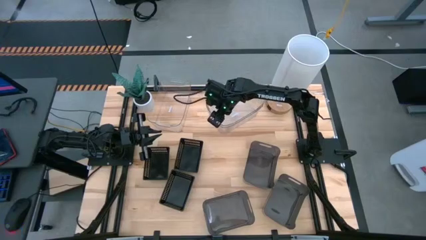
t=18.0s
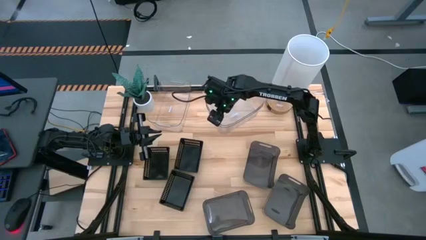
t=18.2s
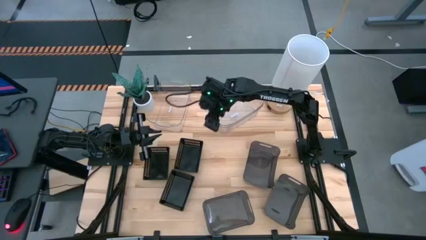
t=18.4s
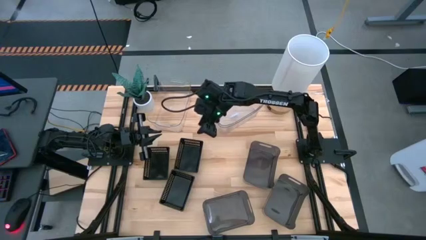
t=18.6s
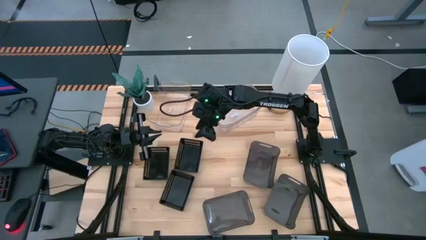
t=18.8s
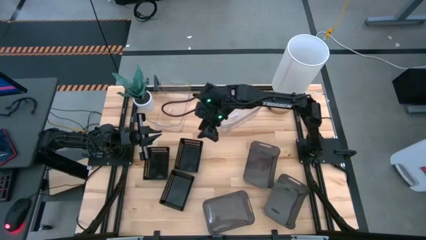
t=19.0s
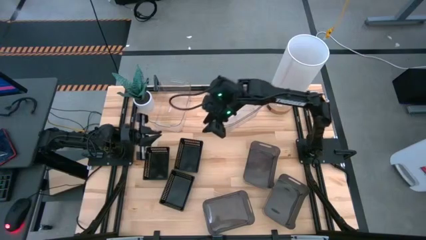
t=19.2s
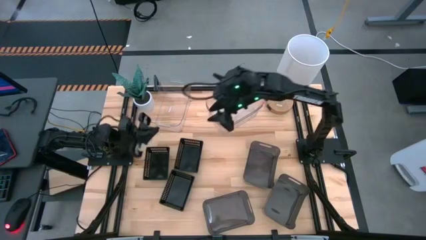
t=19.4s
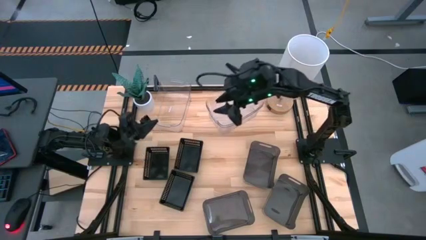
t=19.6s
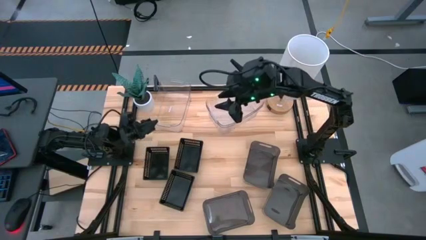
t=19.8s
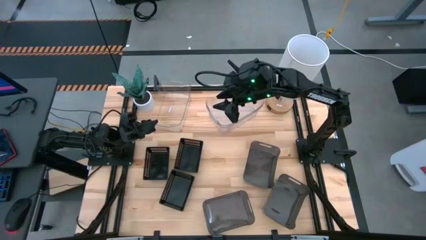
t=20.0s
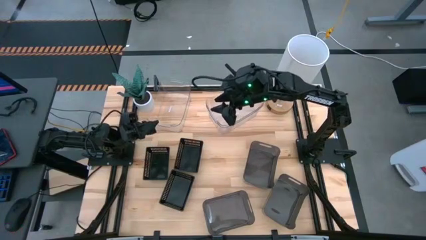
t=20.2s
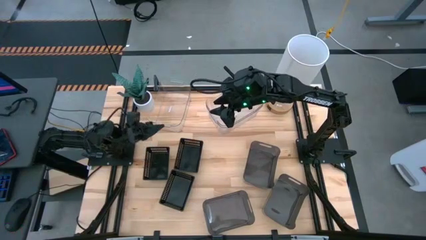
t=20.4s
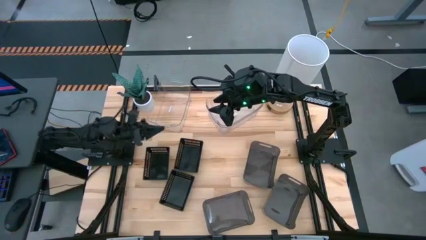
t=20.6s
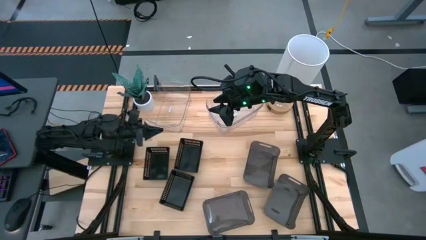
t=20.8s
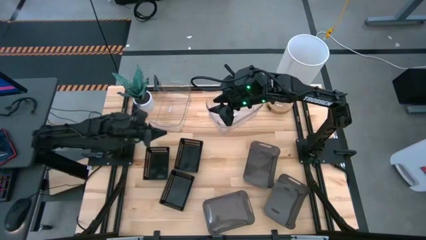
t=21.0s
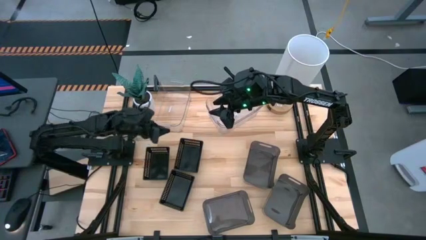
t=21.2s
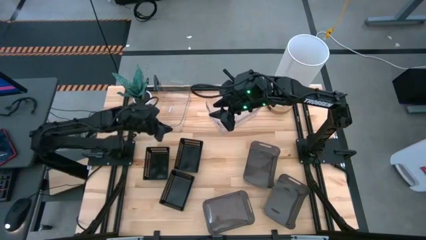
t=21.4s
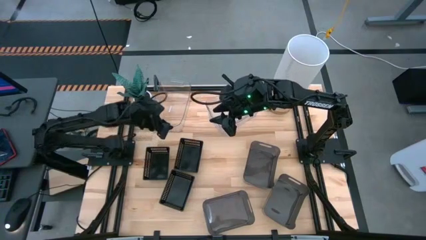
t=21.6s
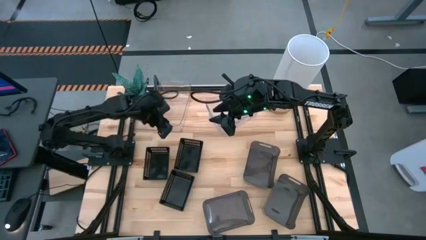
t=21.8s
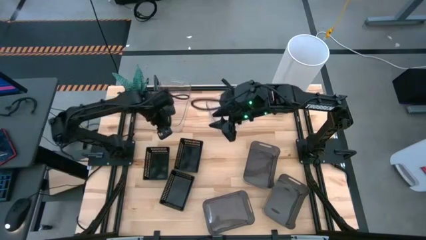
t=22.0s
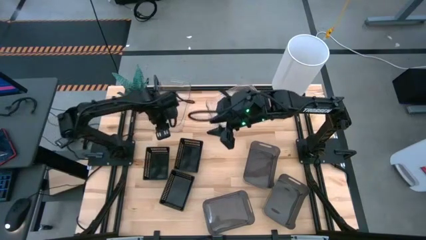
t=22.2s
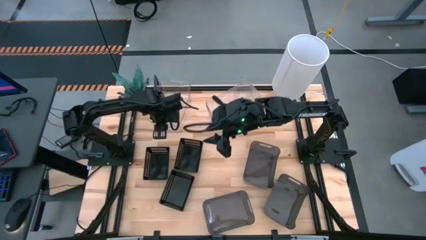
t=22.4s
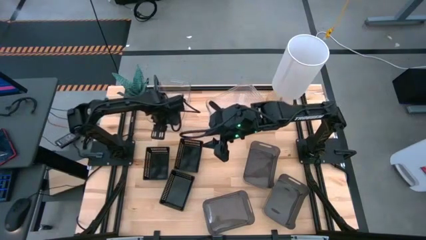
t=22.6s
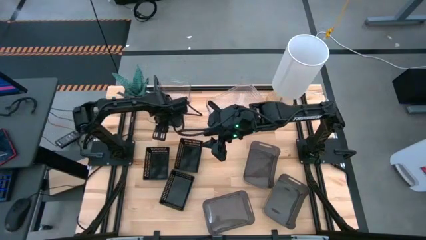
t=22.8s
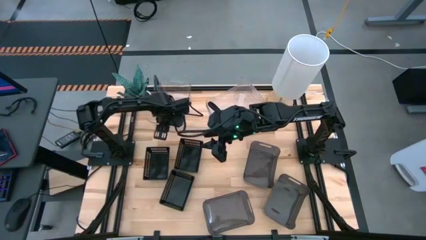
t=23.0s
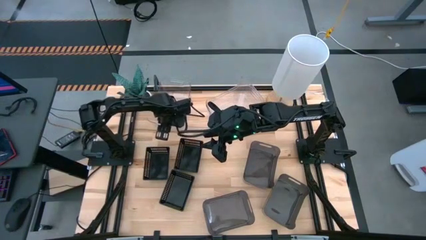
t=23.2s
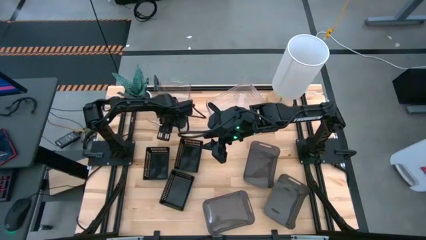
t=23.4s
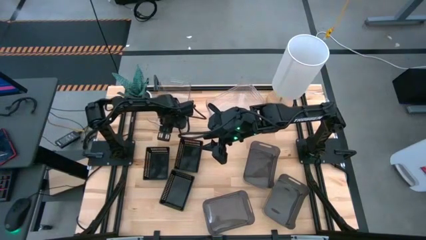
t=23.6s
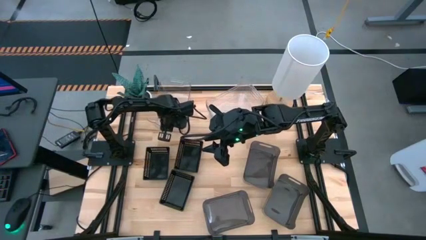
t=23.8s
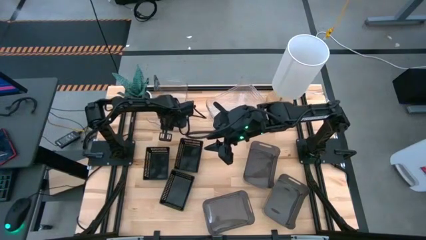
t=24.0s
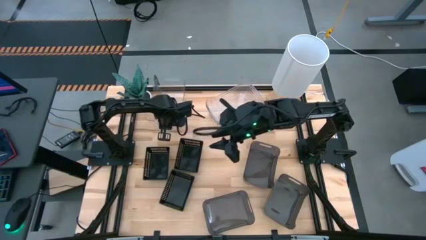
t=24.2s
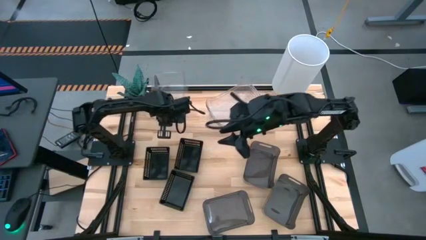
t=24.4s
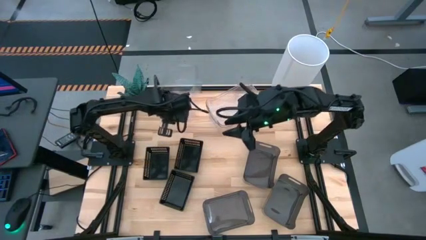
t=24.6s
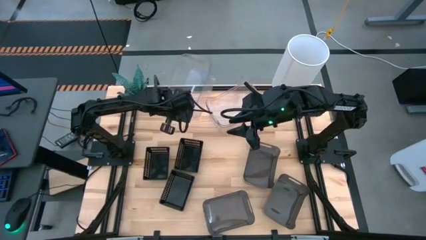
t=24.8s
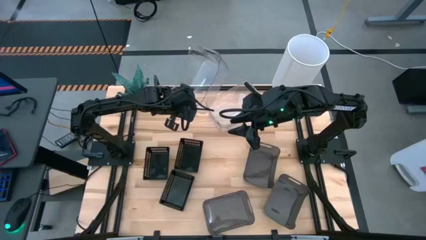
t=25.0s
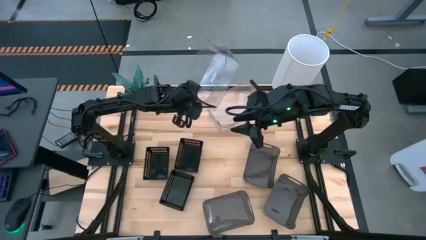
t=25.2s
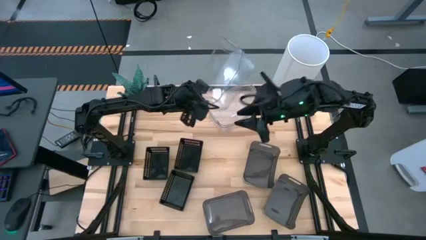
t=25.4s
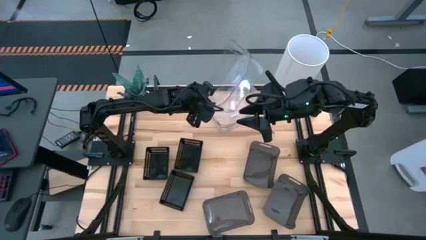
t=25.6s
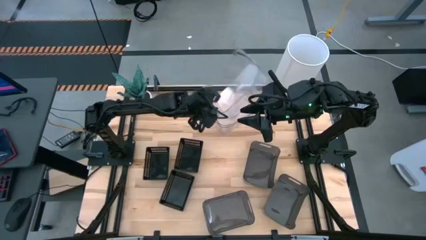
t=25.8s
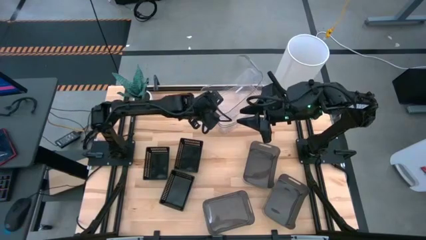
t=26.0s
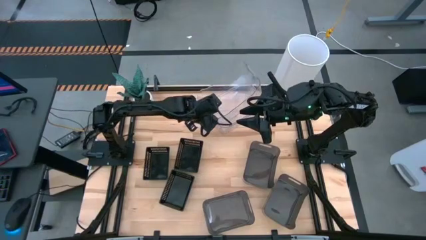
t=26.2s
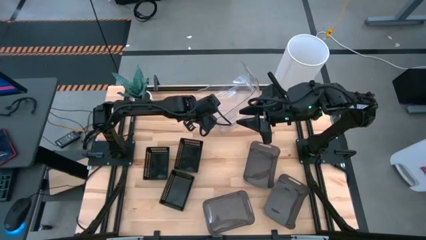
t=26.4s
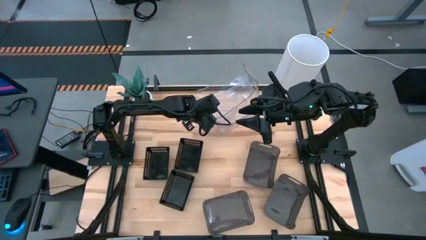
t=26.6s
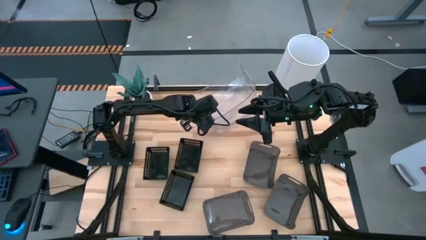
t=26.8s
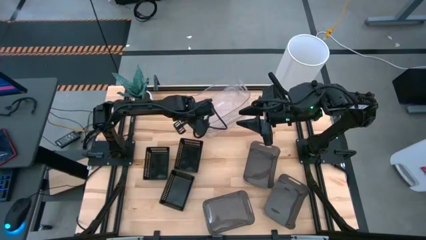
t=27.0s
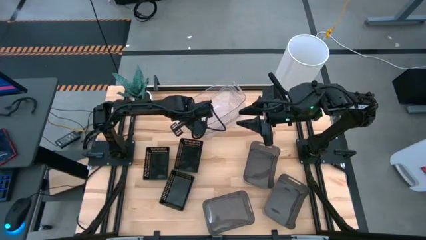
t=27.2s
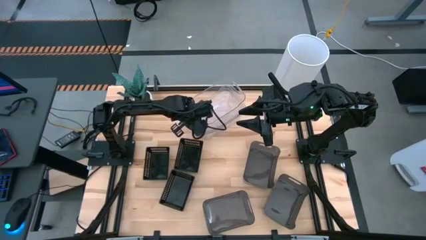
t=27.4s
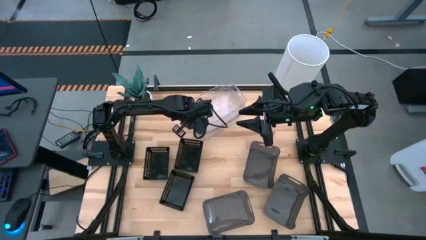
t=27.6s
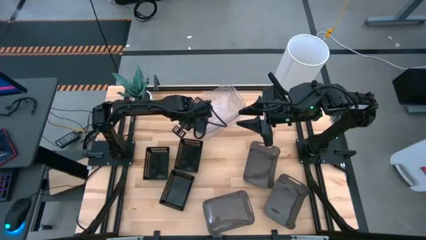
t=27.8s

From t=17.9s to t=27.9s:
Stack the left transparent bin on the top of the transparent bin

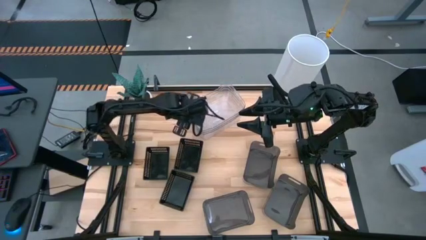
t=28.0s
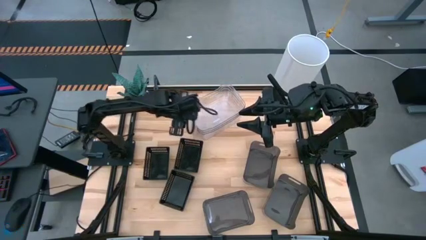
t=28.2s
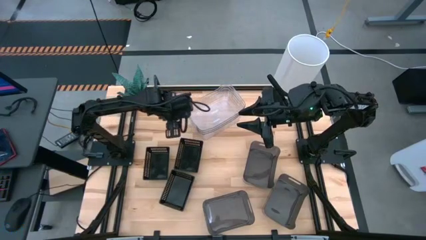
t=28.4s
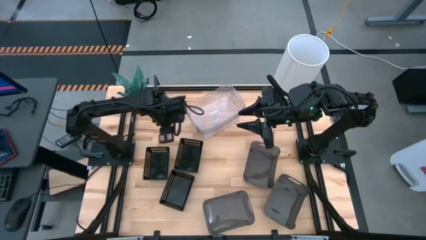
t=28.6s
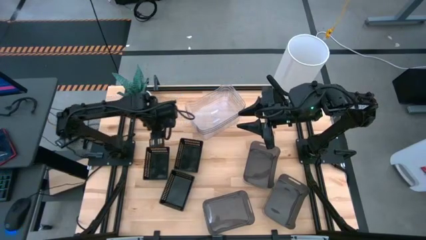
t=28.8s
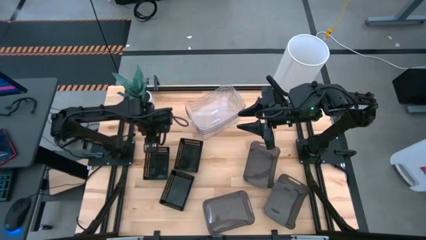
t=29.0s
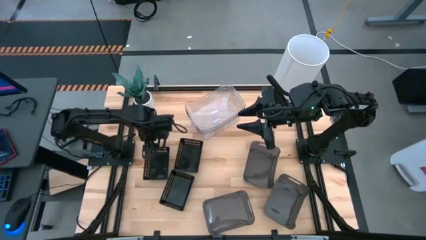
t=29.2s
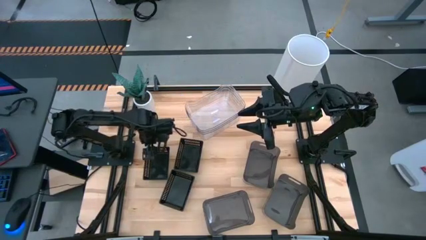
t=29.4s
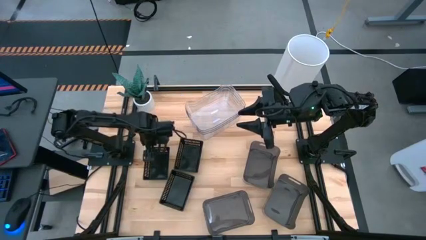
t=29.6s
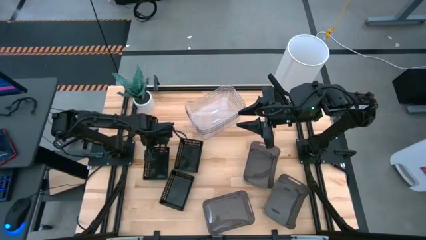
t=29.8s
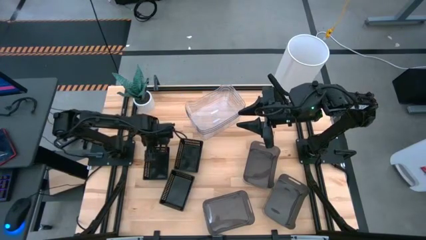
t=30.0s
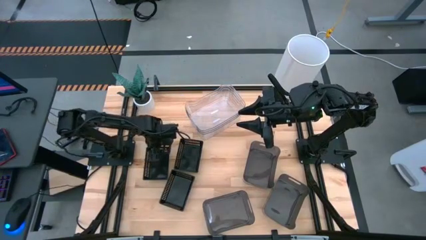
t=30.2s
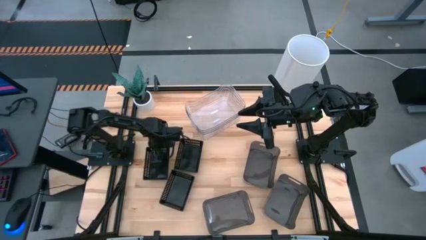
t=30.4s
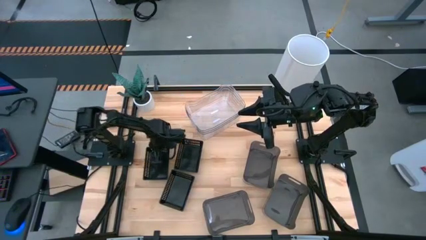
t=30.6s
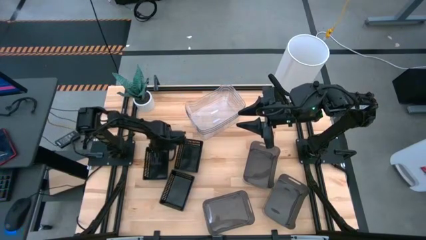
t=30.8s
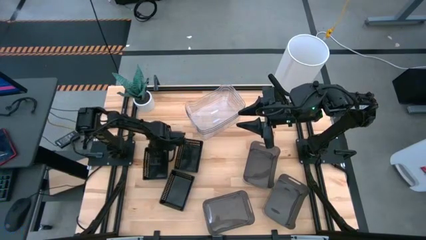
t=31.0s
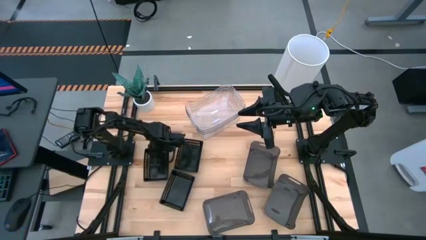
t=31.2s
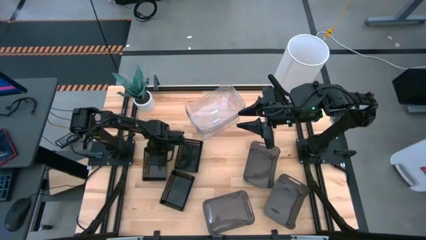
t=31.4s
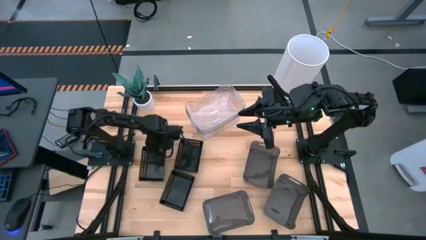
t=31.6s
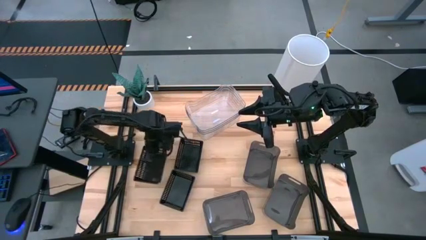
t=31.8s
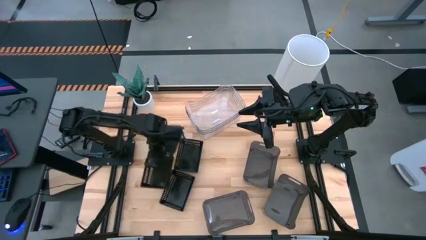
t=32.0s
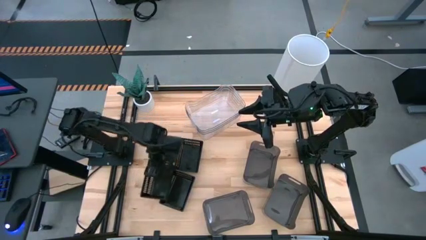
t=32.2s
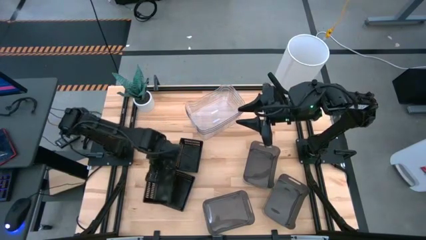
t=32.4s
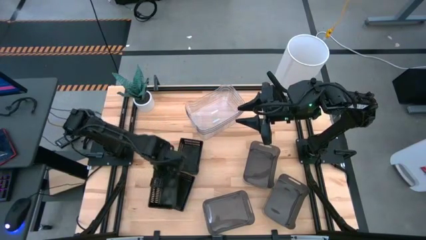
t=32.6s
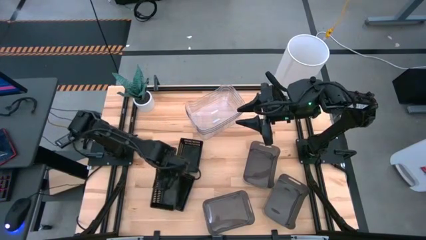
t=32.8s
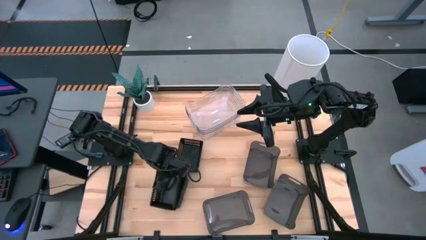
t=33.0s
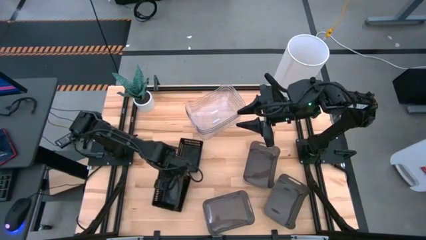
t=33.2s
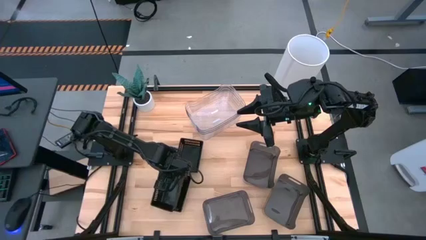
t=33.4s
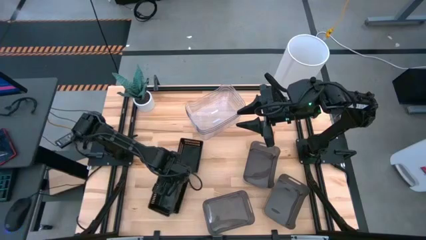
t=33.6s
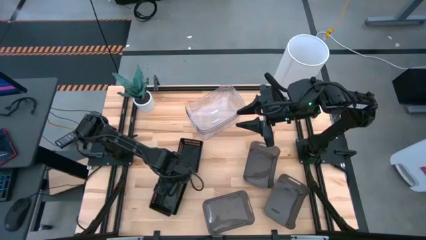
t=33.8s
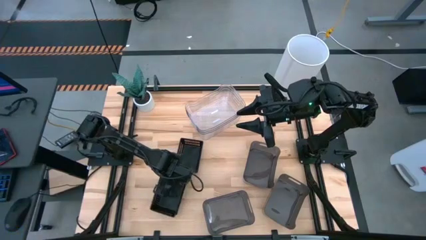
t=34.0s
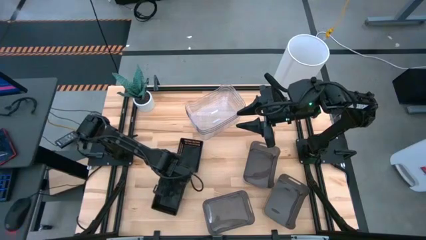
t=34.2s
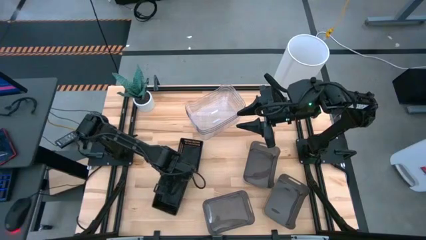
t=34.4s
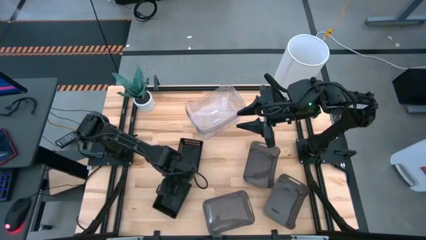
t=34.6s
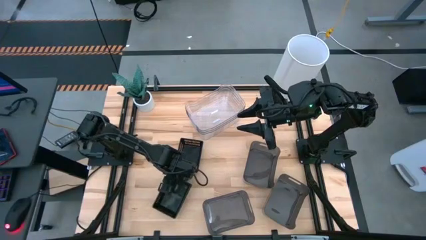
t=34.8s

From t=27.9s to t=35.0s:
Stack the left black bin on the top of the bottom black bin
